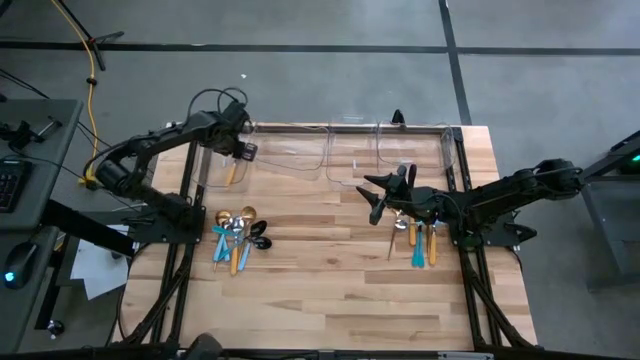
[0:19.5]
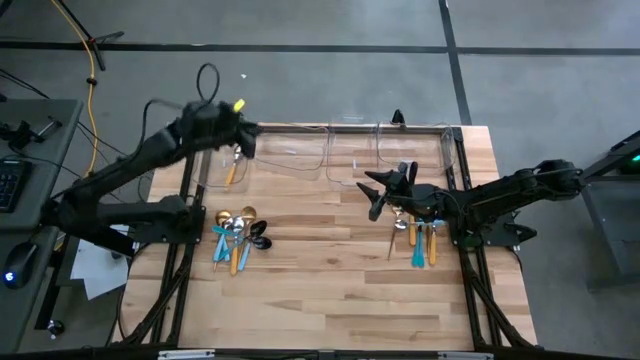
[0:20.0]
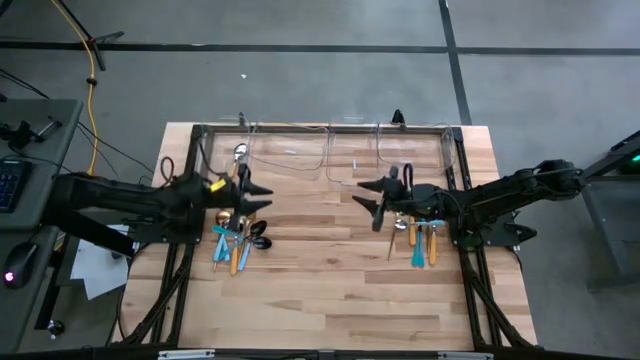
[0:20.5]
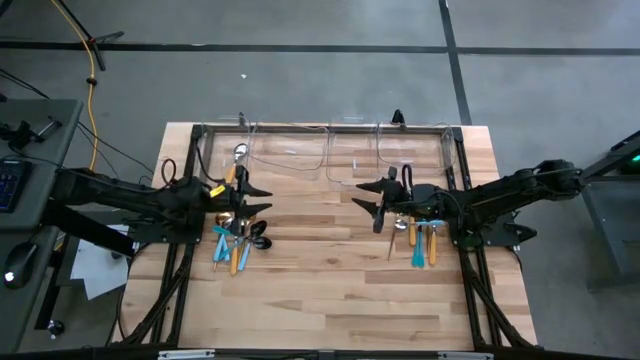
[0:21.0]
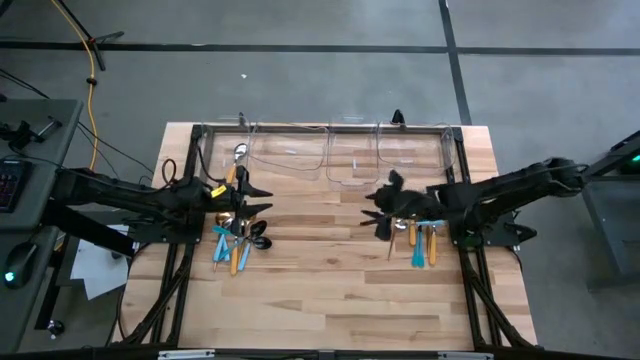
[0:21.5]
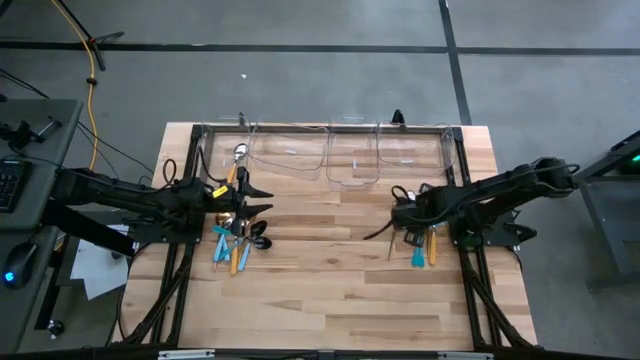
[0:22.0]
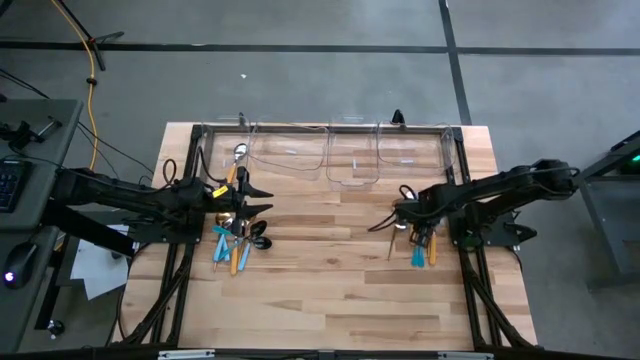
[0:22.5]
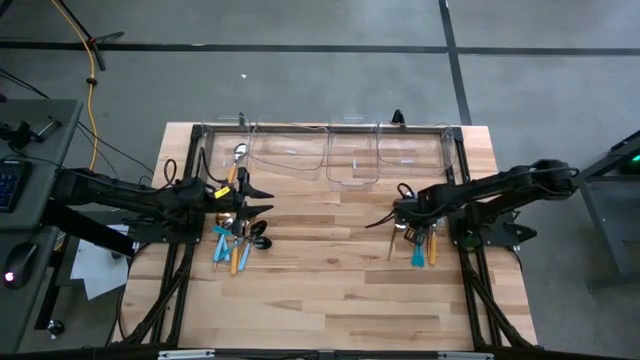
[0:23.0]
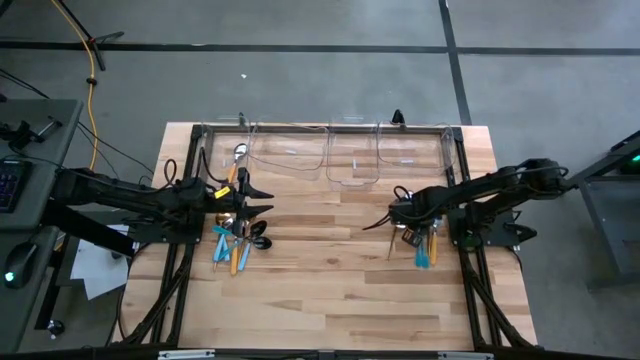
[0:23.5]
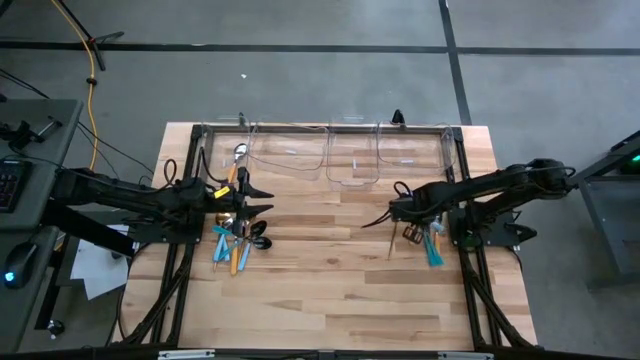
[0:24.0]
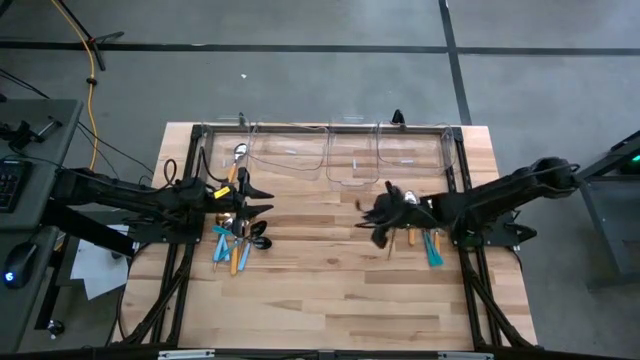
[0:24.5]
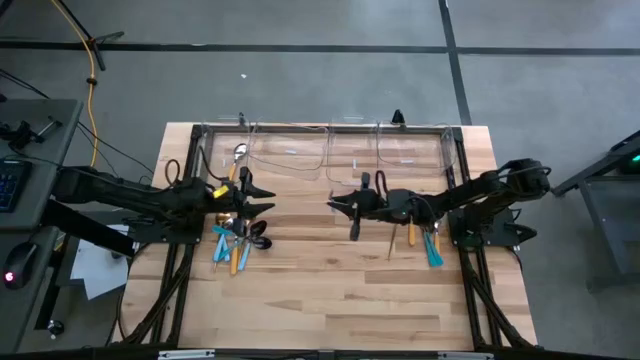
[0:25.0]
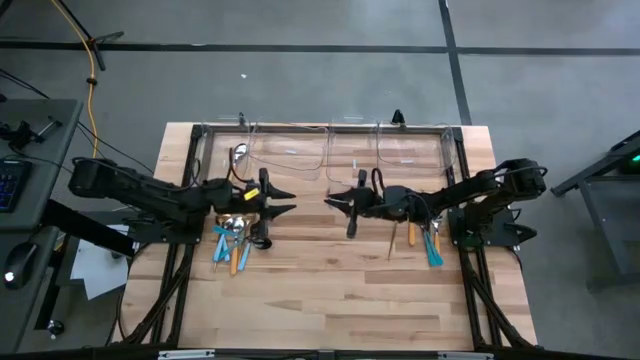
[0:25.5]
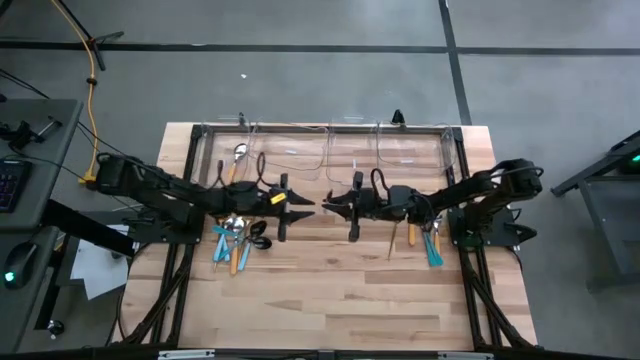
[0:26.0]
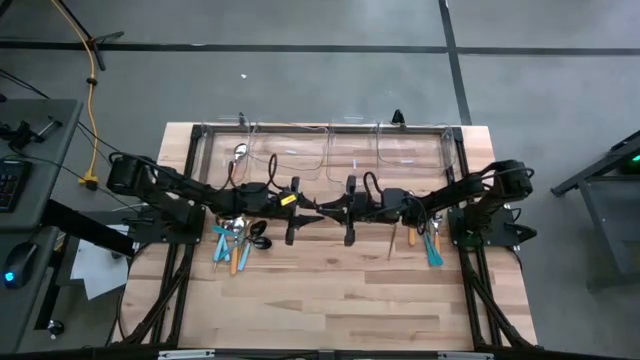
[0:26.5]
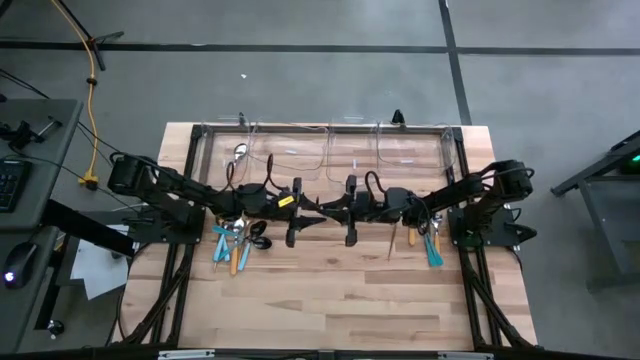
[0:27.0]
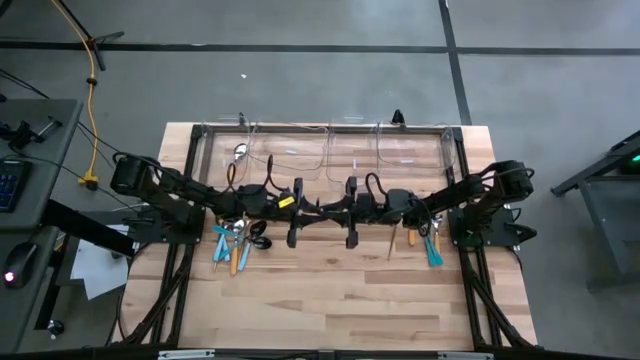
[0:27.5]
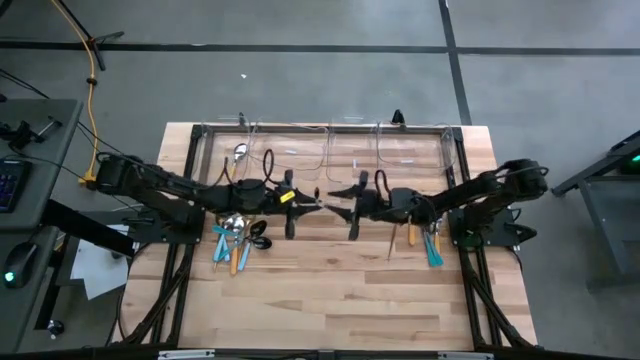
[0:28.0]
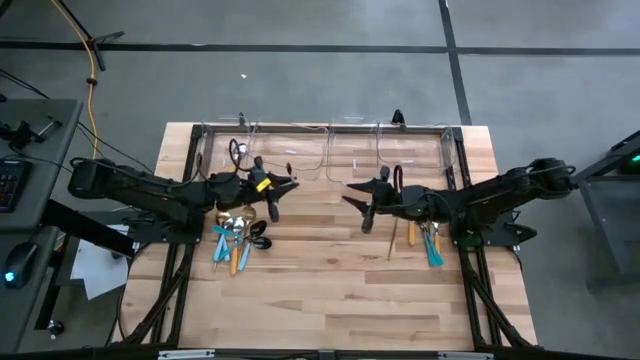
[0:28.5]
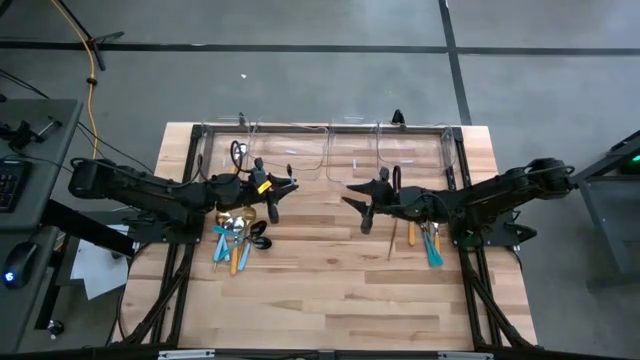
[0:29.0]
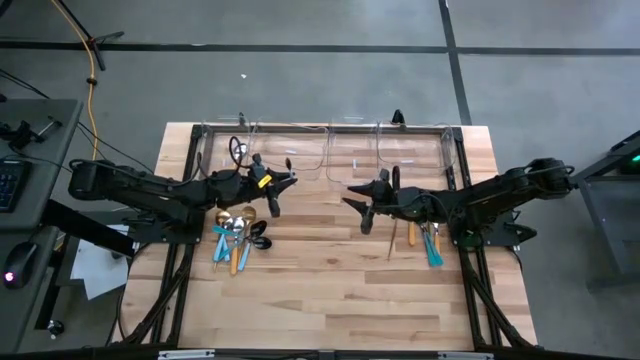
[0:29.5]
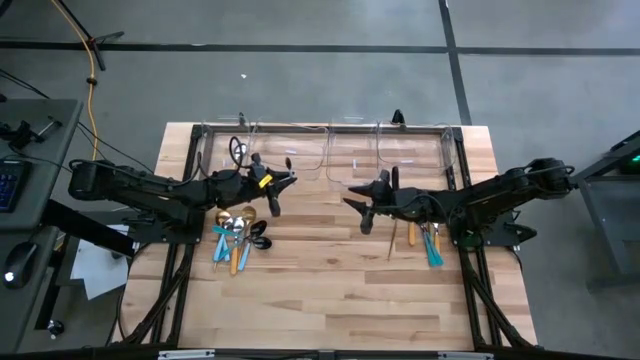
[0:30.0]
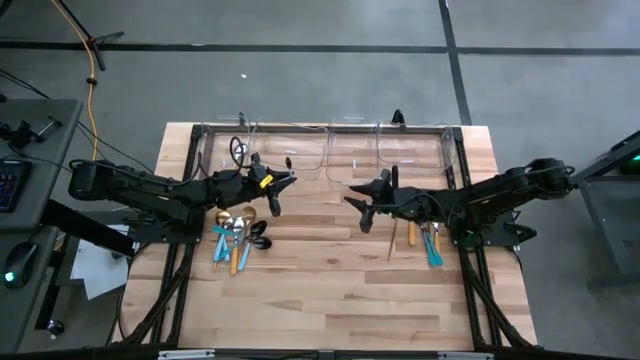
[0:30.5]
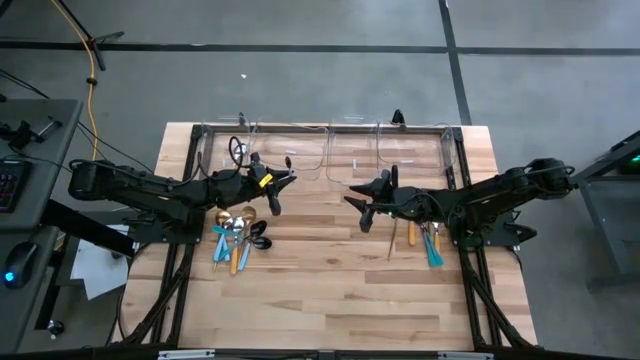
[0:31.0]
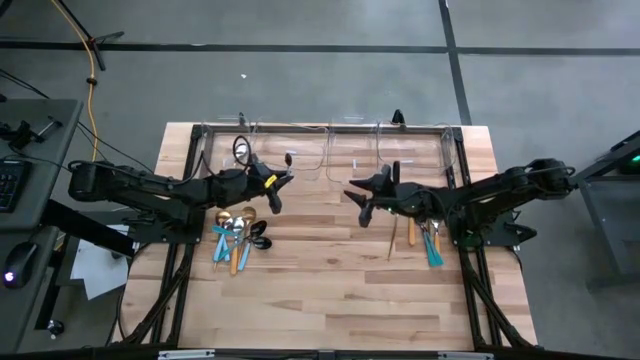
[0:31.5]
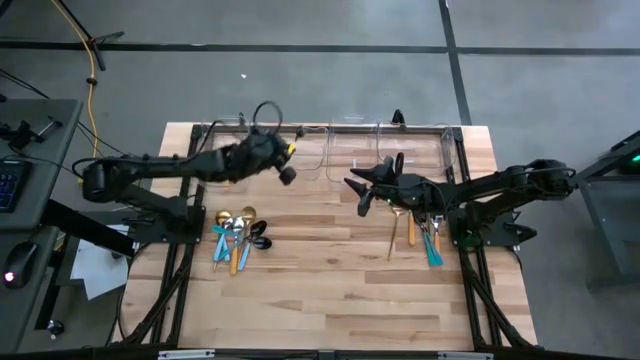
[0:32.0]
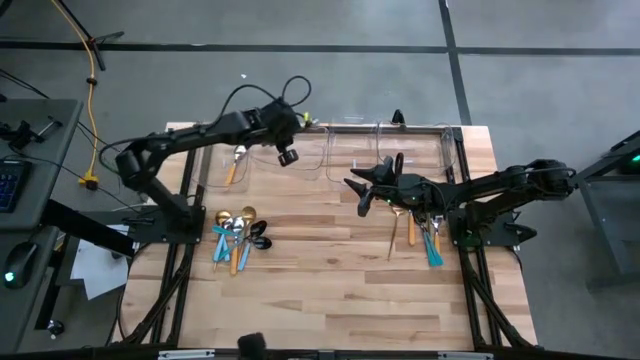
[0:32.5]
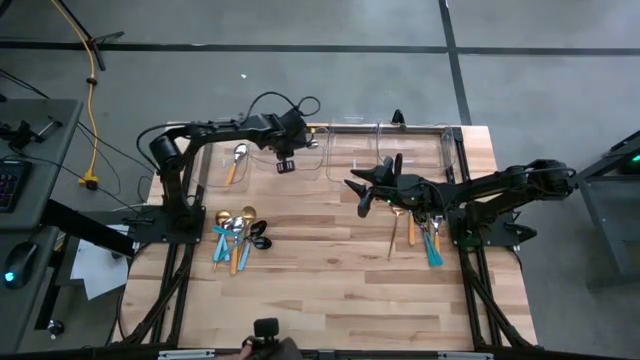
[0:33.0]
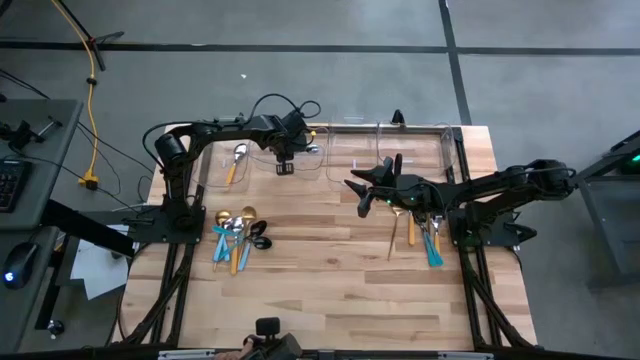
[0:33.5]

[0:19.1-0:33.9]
Task: Sort silverware by color (type)
Put the blue spoon into the middle left transparent bin

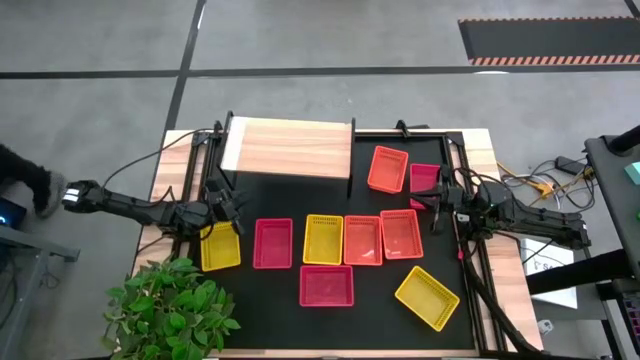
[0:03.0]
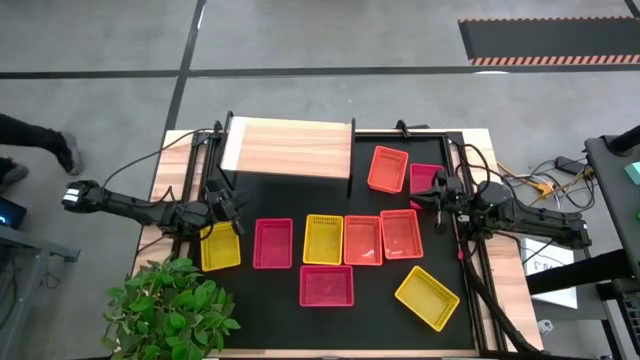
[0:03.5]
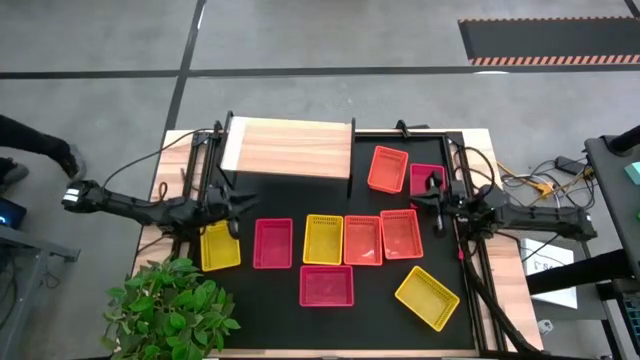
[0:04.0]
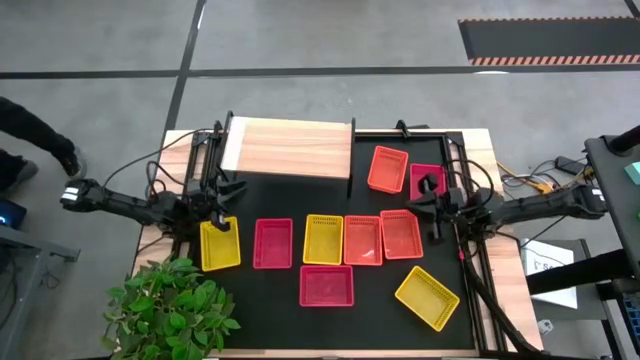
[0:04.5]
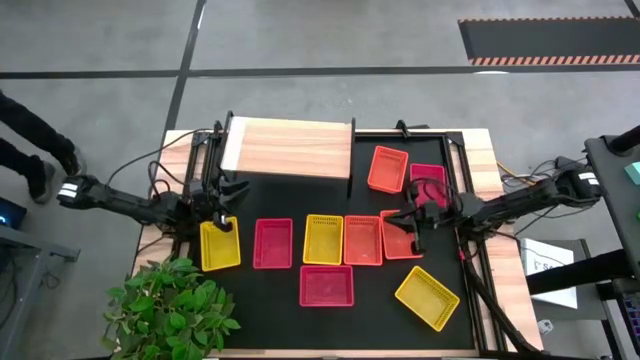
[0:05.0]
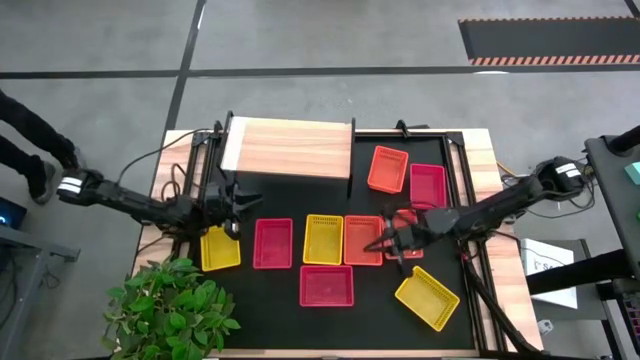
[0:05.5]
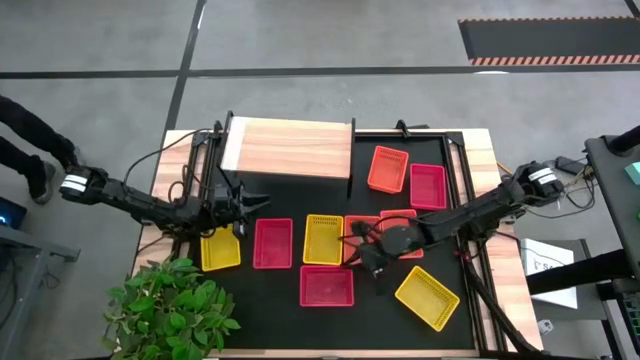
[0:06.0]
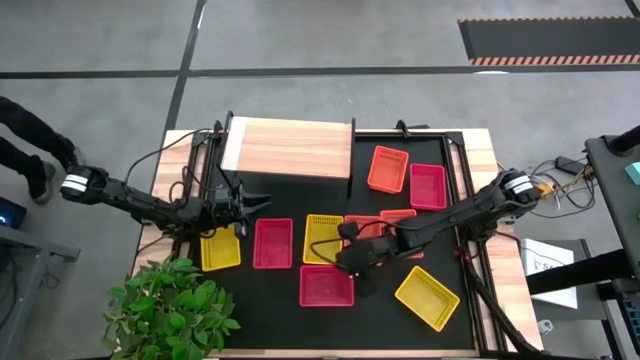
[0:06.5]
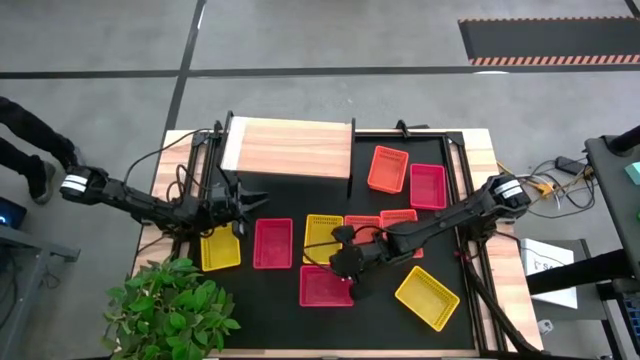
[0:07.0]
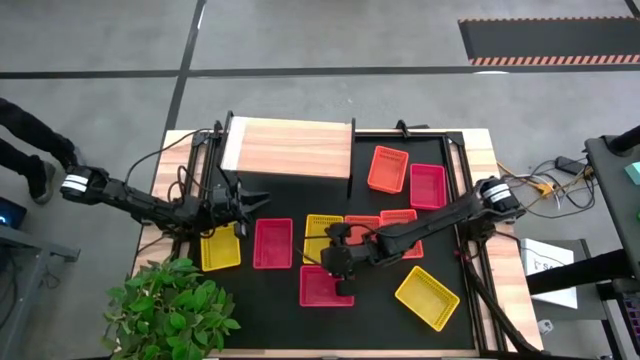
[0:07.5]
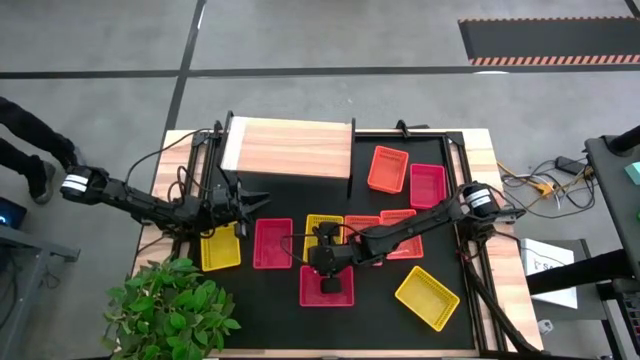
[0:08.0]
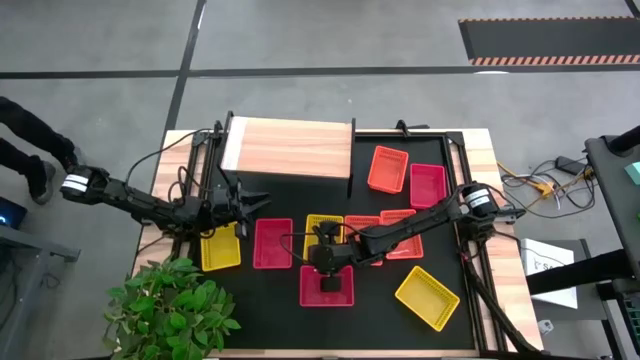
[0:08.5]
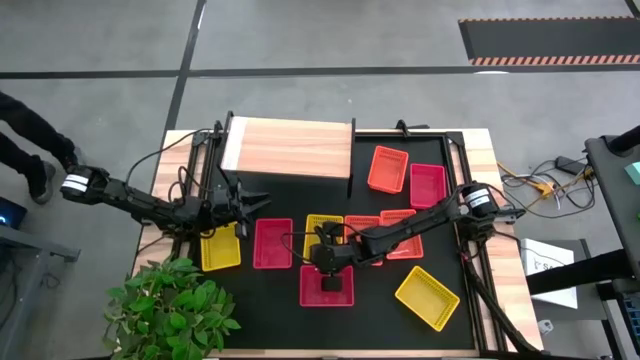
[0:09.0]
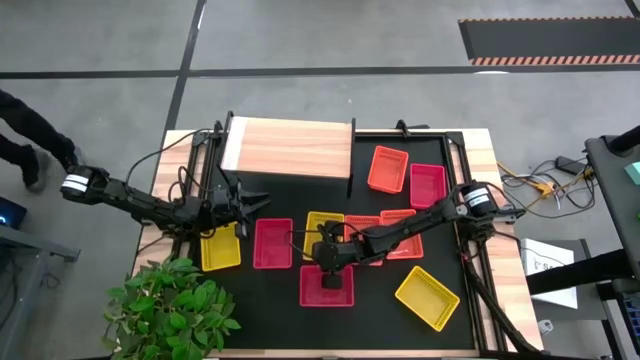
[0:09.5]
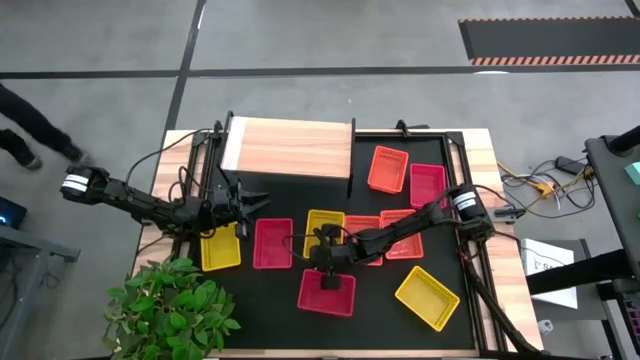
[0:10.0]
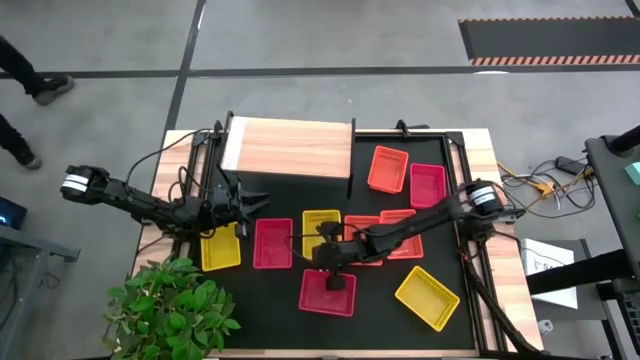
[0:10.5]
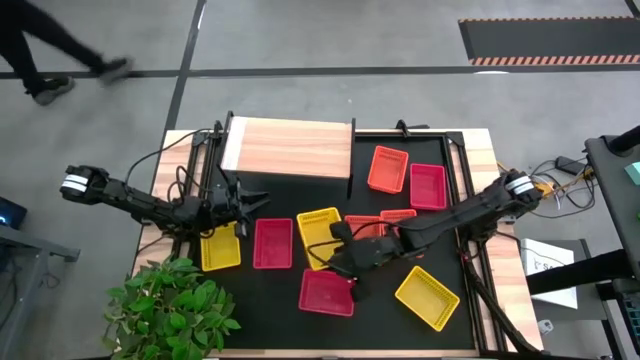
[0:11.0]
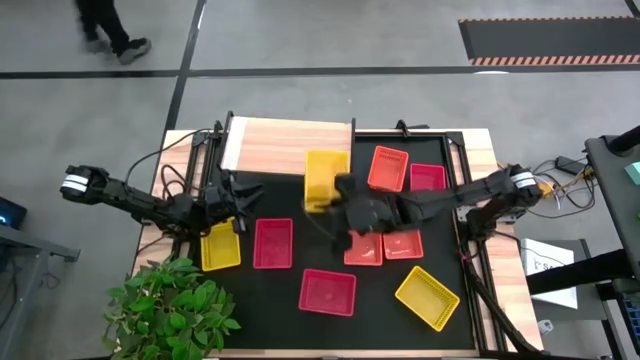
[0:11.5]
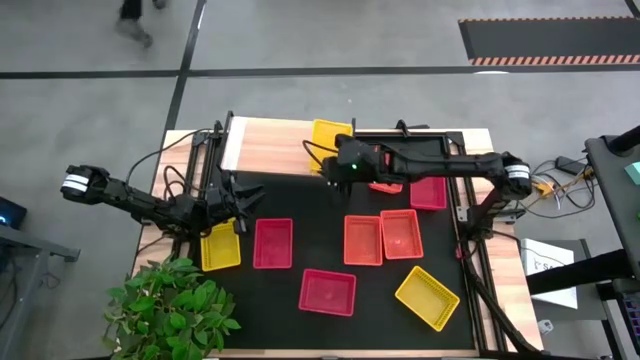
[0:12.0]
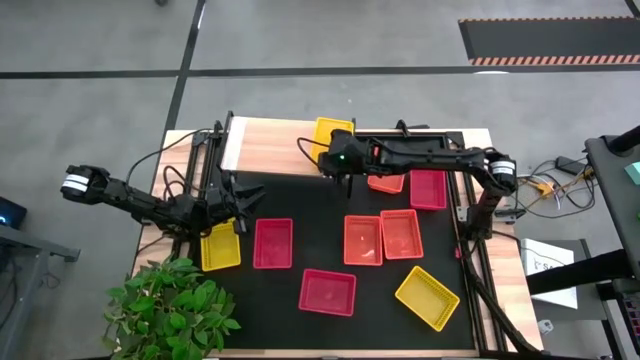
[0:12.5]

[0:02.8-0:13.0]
Task: Stack baskets on shelf by color
Put the middle yellow bin on the shelf
